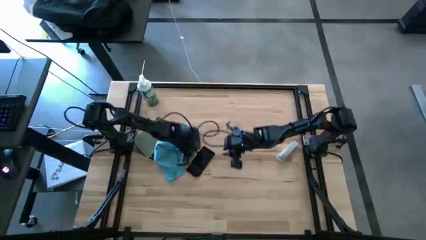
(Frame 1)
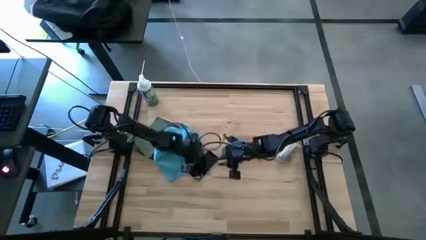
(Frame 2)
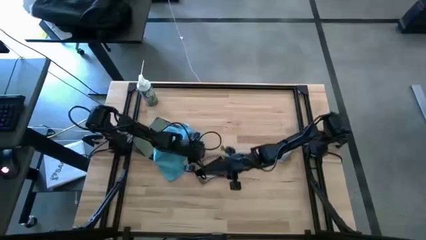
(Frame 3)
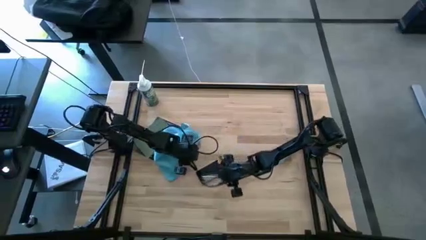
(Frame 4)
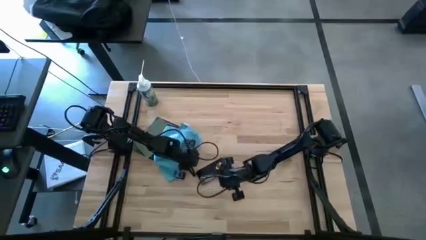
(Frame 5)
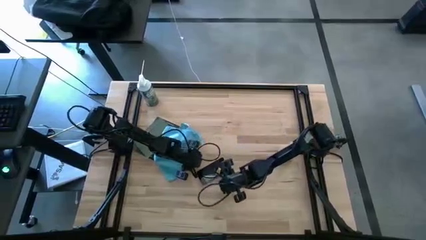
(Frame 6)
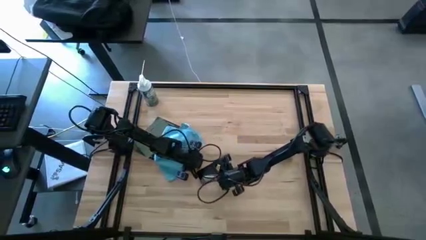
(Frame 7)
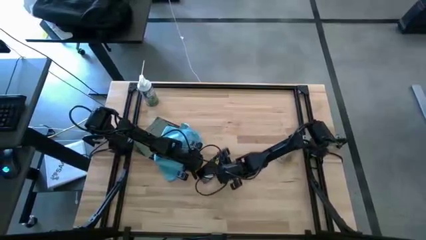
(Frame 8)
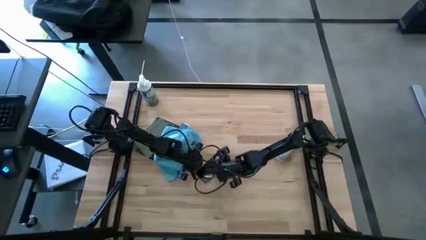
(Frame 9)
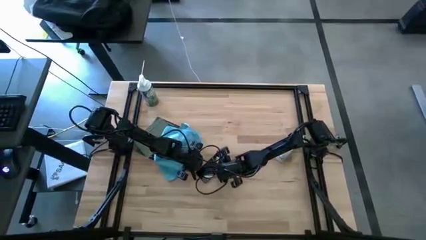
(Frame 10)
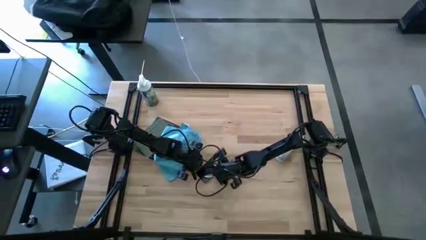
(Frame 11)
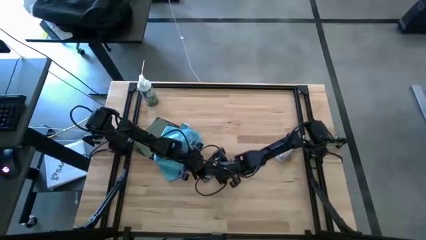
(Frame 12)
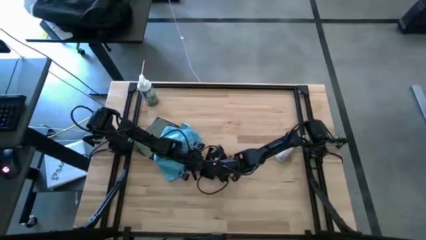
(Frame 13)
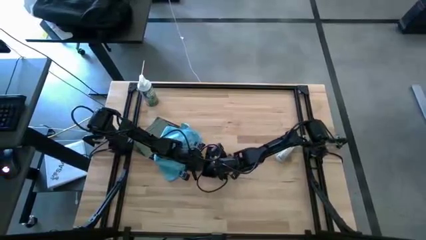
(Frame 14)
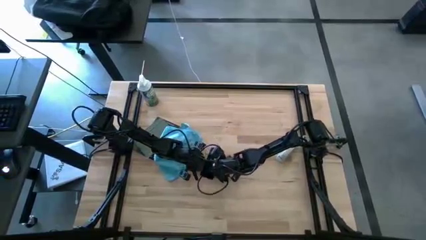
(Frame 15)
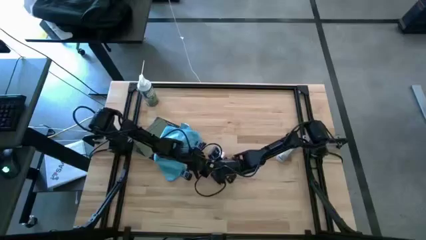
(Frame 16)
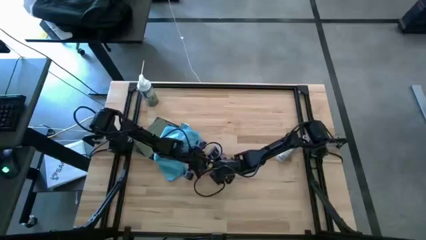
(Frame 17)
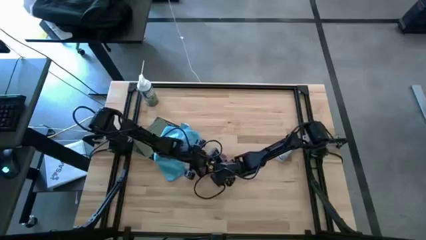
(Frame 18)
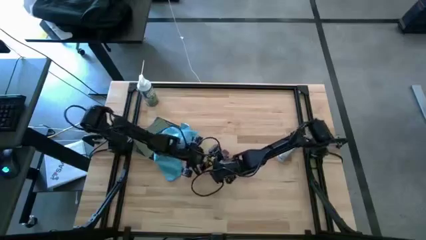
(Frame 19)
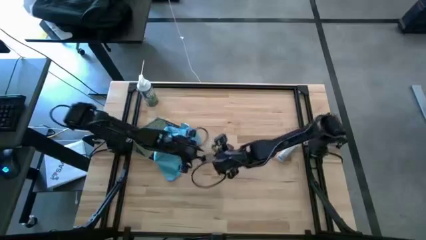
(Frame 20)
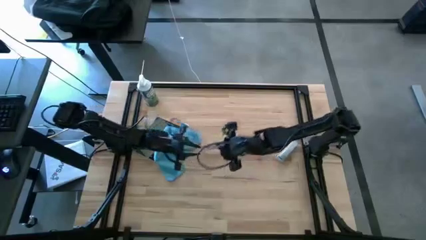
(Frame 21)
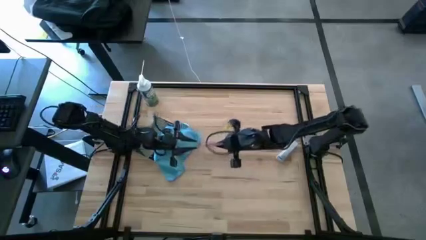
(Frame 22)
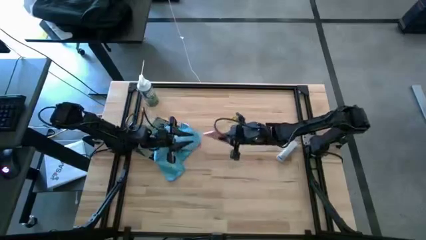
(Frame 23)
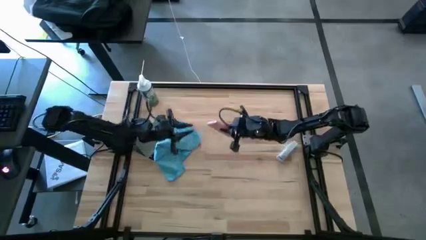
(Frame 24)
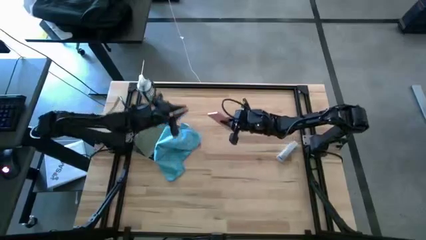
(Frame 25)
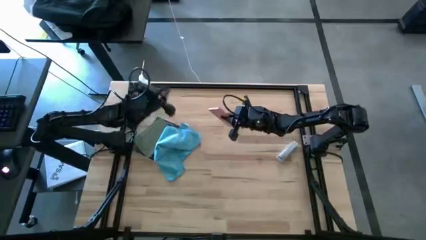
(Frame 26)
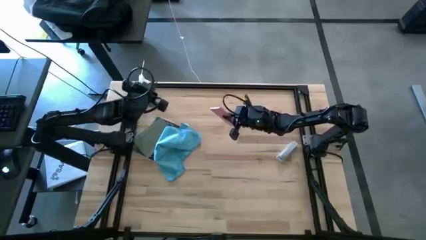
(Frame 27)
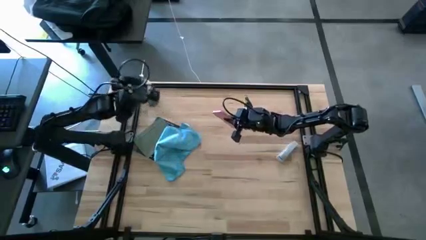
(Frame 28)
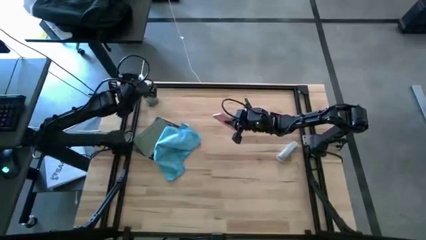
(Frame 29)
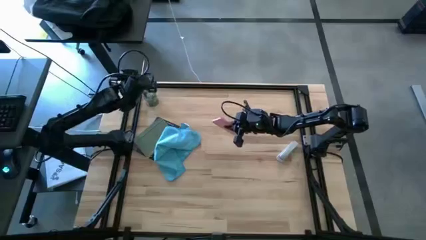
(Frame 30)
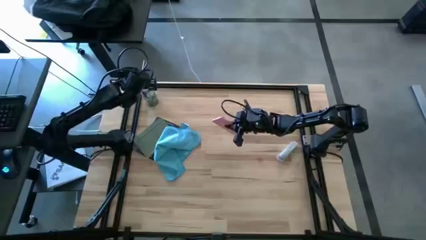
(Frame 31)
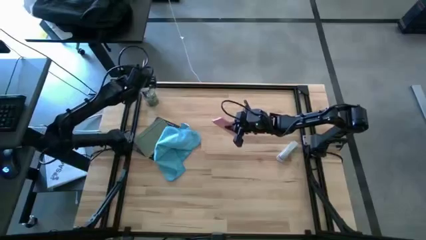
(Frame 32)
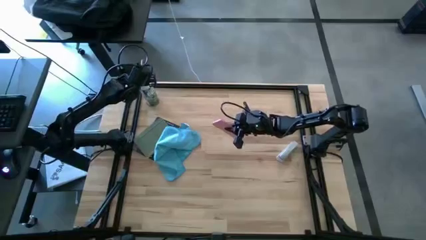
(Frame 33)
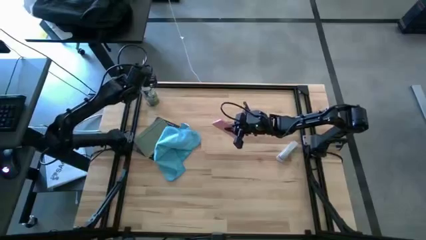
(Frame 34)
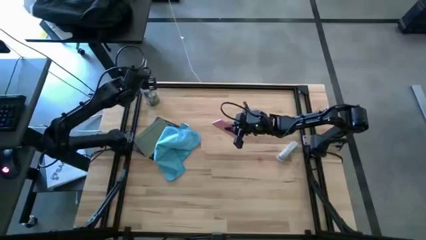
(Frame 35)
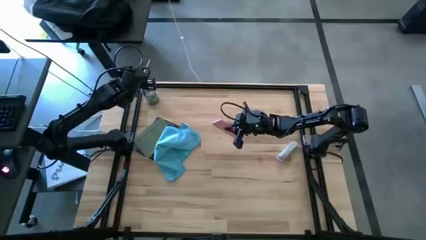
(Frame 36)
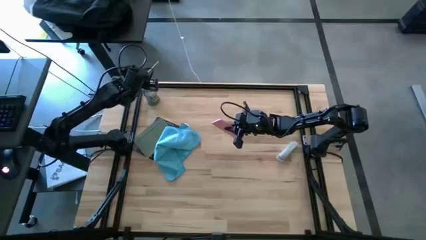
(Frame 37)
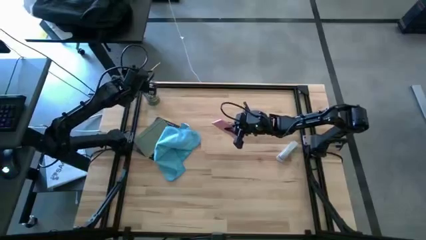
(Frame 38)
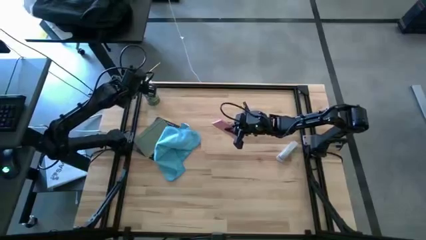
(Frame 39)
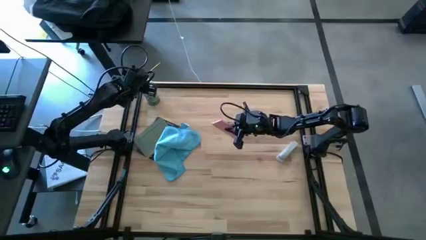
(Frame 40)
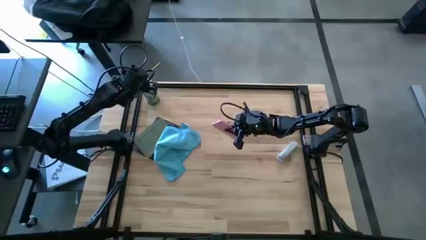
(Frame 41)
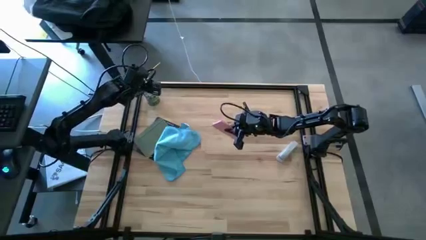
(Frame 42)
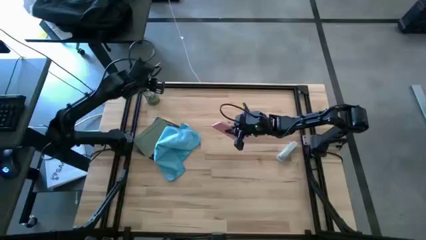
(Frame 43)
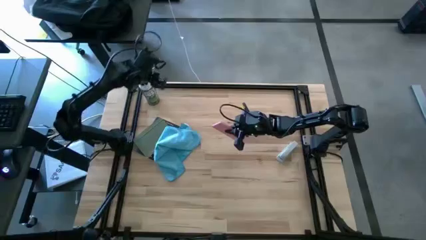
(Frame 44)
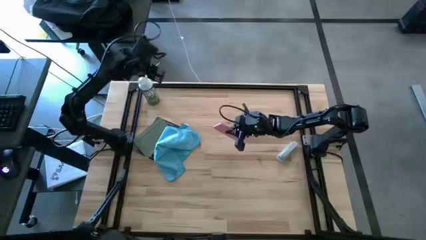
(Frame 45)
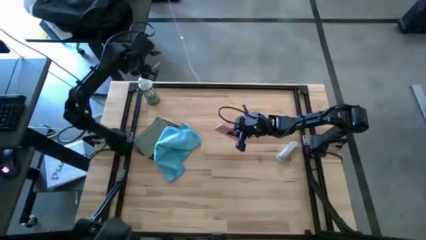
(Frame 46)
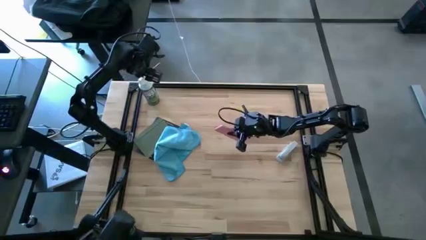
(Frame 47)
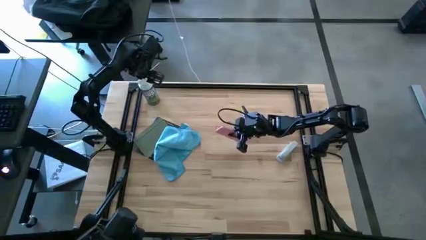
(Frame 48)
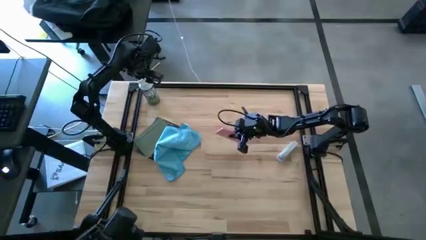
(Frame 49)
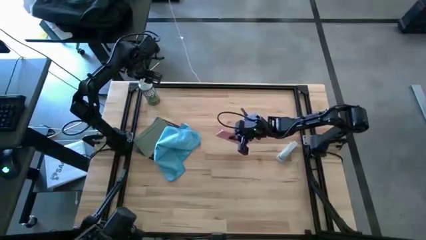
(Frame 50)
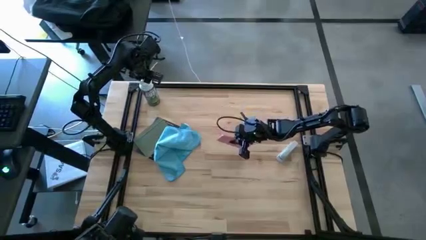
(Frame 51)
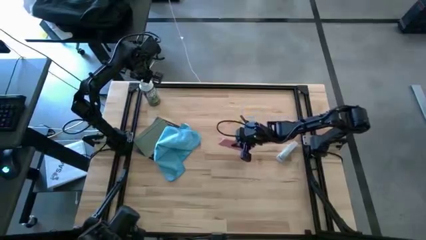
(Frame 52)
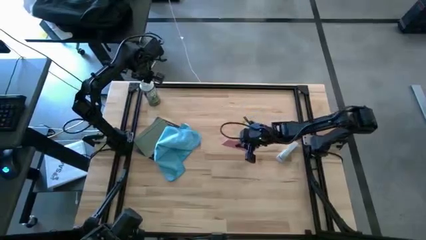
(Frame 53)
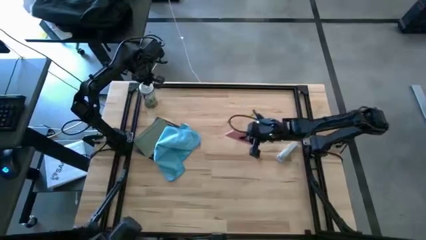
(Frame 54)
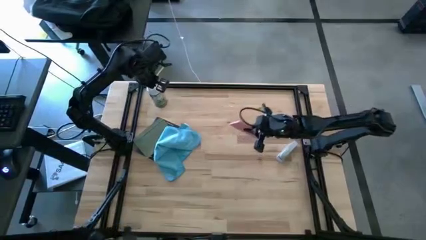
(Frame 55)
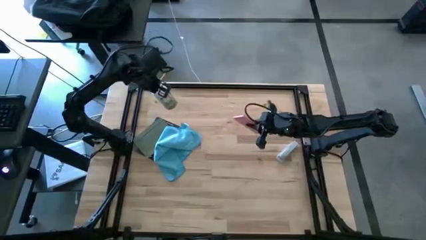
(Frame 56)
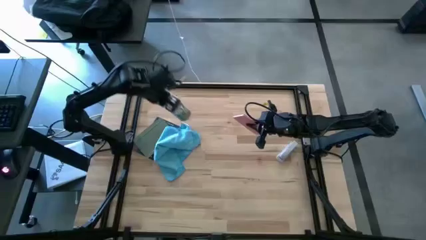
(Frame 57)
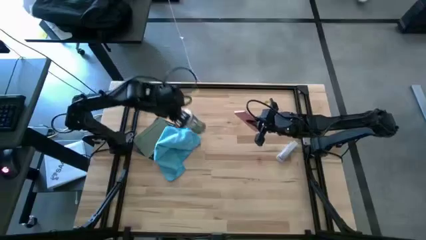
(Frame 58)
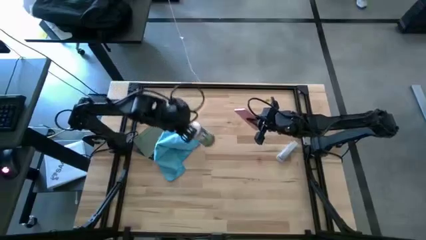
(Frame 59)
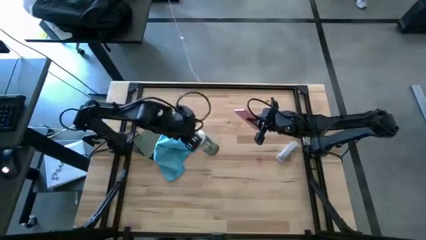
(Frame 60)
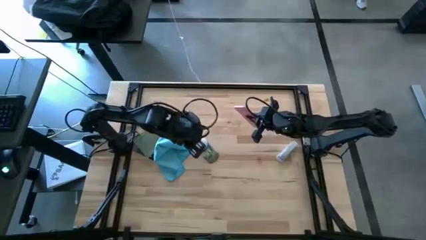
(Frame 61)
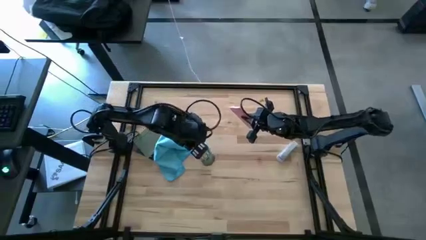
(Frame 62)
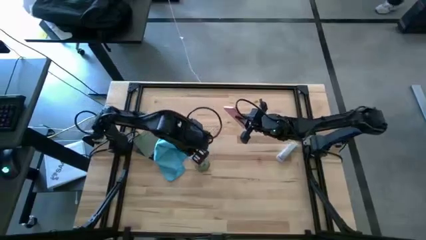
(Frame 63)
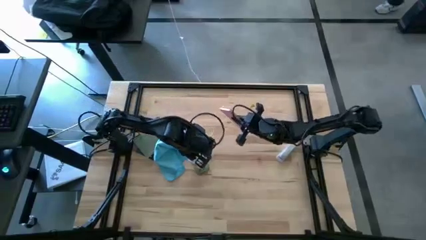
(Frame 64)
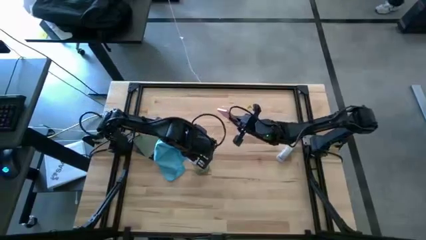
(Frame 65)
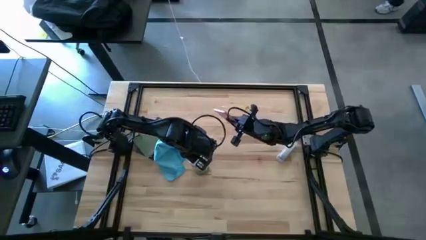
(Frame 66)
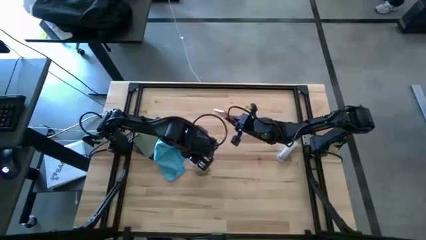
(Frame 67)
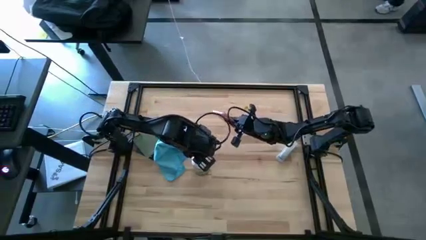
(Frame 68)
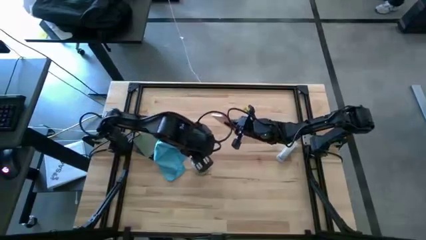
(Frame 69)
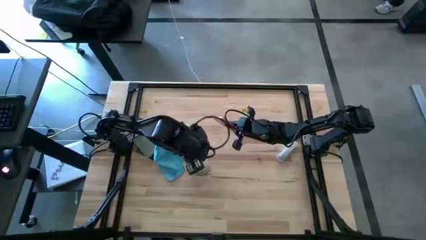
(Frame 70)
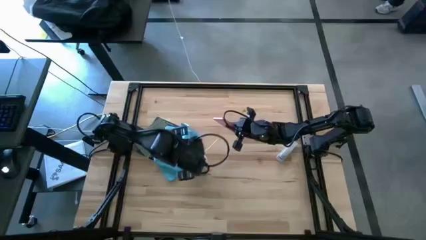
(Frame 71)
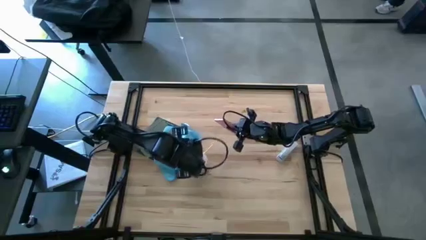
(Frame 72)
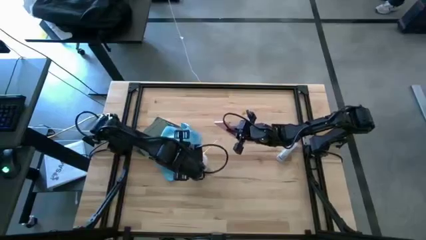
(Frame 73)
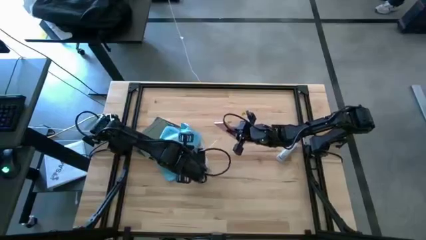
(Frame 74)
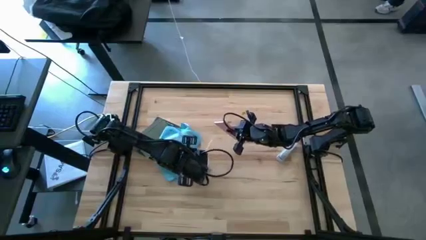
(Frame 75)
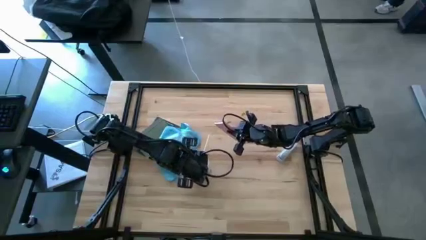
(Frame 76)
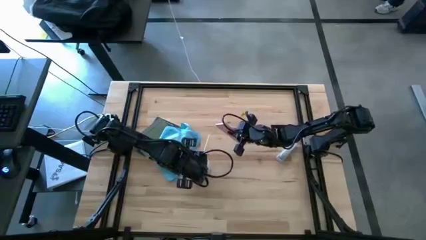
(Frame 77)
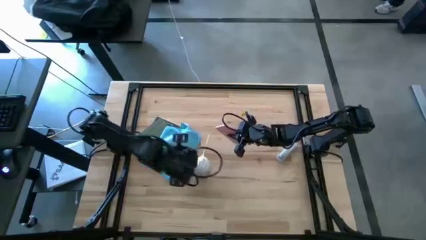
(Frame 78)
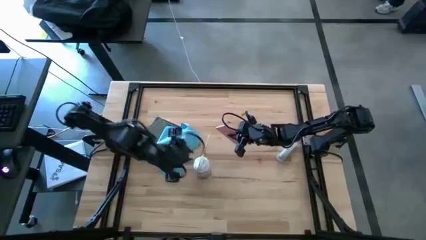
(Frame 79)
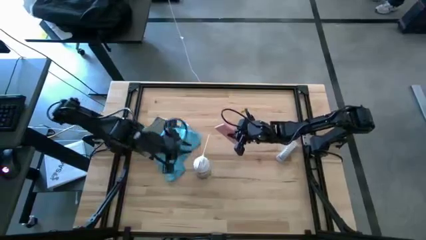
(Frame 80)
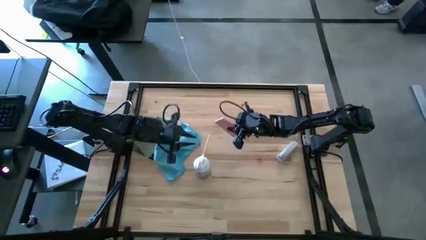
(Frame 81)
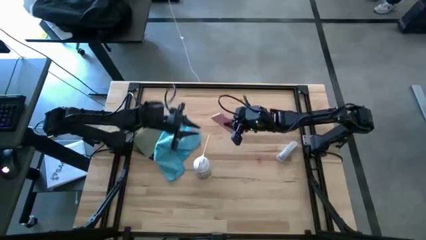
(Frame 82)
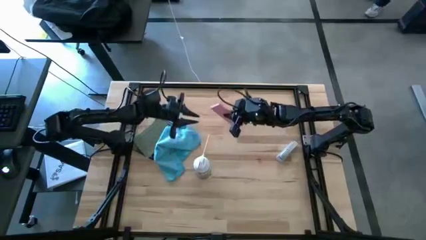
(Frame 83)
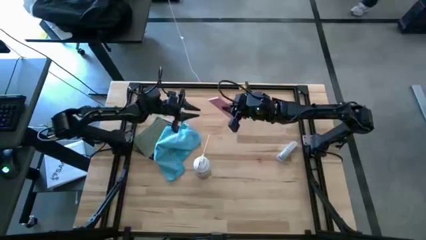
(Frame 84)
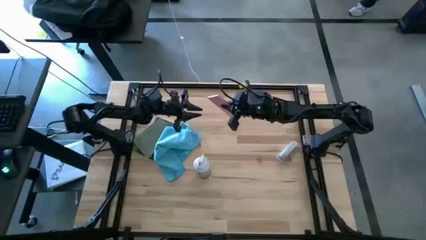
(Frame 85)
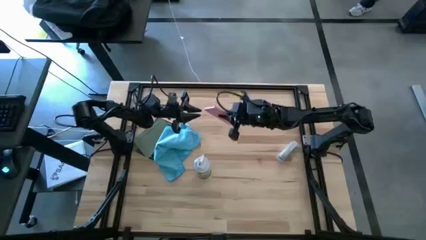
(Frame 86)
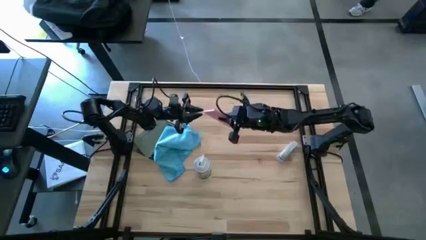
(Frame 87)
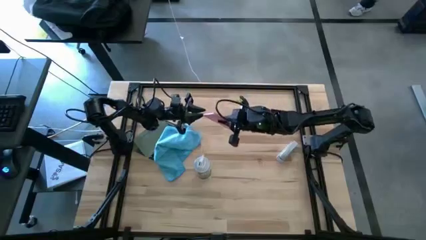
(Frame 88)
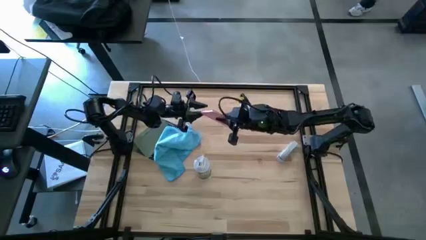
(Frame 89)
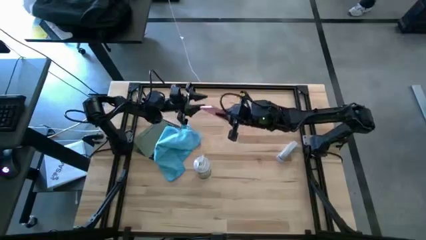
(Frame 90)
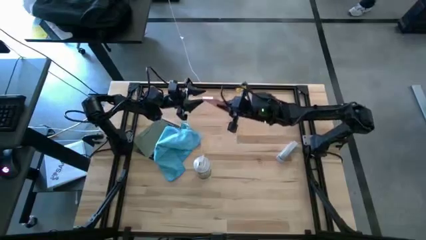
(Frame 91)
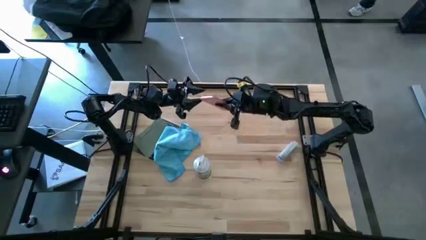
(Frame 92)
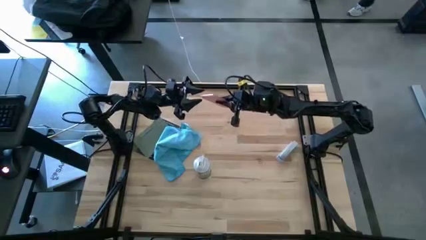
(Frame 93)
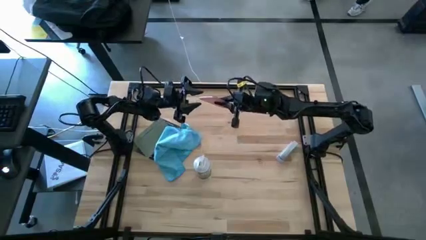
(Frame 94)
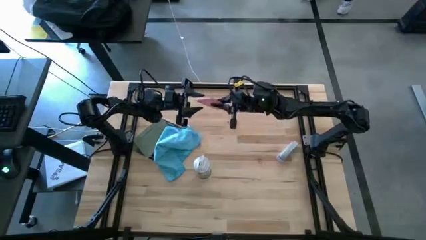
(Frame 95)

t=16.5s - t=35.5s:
Task: Apply microfiber cloth
Spray the cellphone with the spray bottle cleaner
